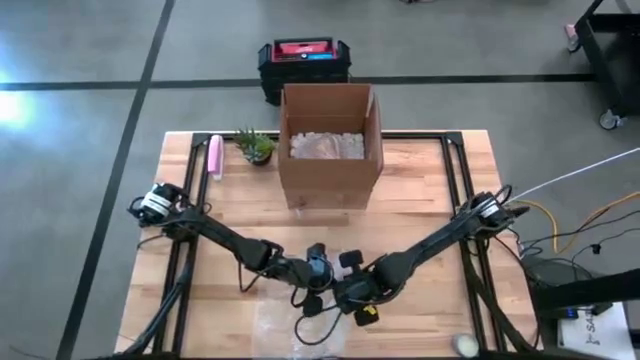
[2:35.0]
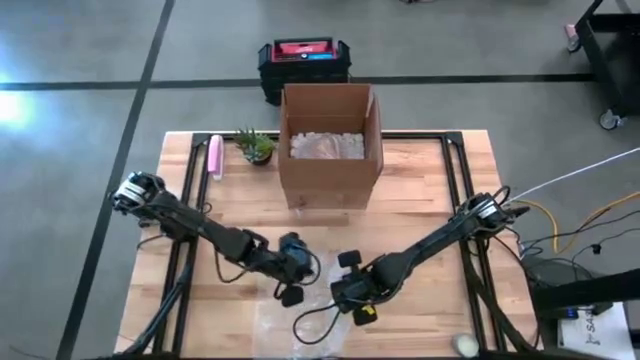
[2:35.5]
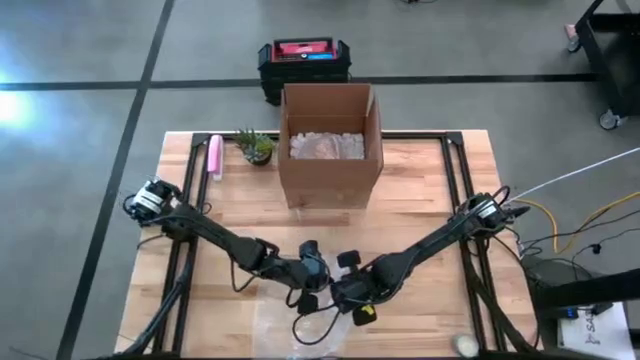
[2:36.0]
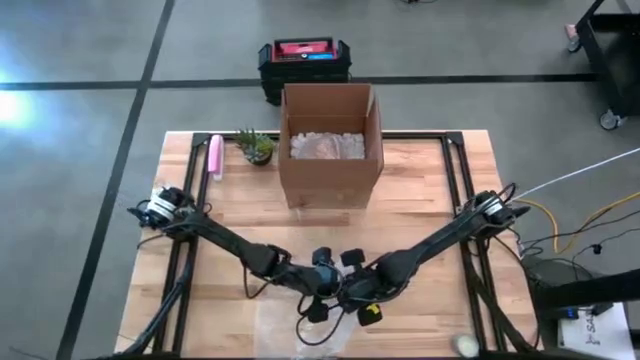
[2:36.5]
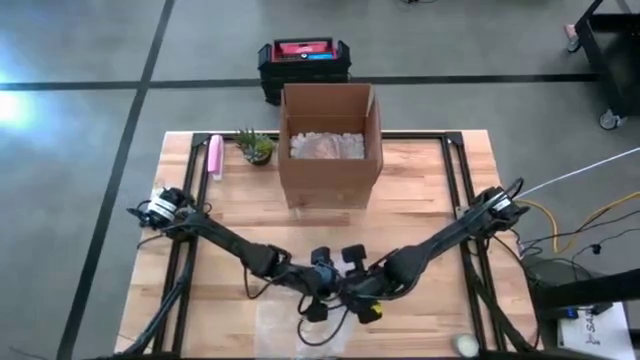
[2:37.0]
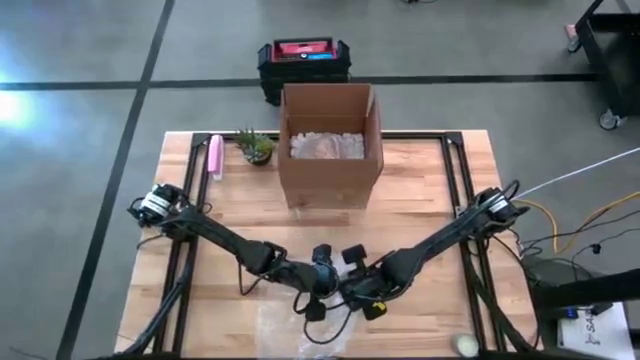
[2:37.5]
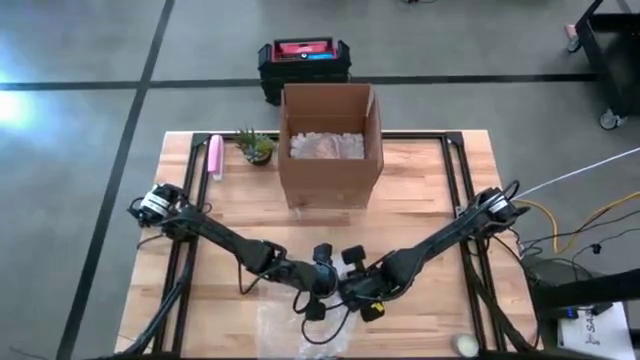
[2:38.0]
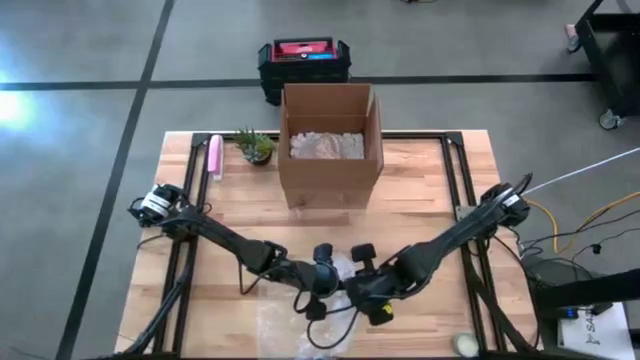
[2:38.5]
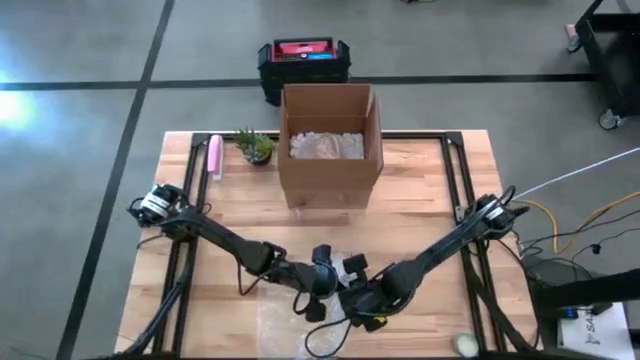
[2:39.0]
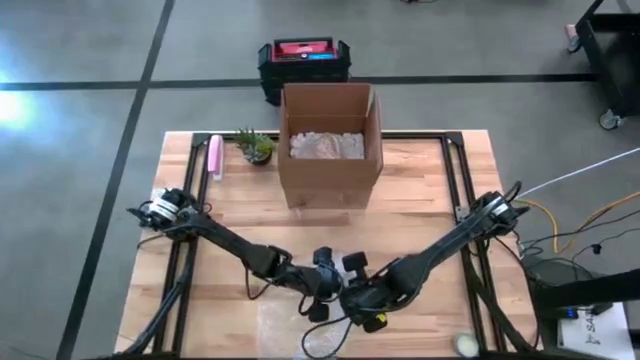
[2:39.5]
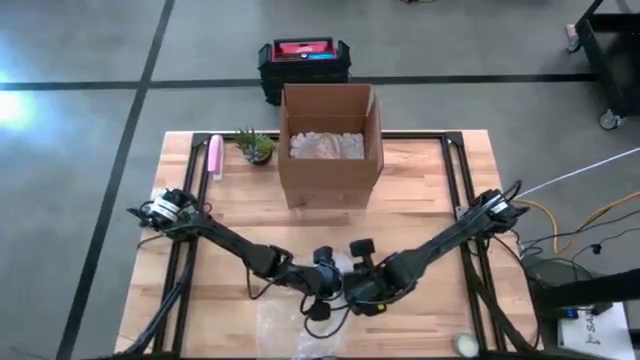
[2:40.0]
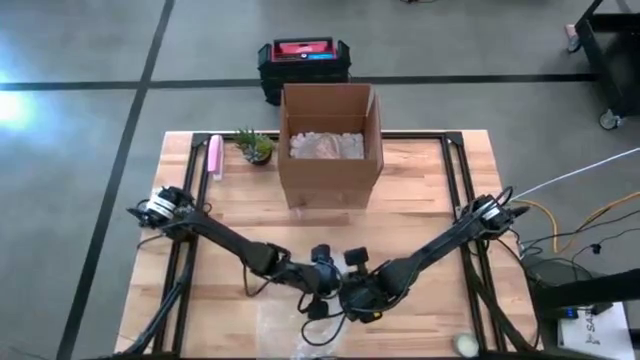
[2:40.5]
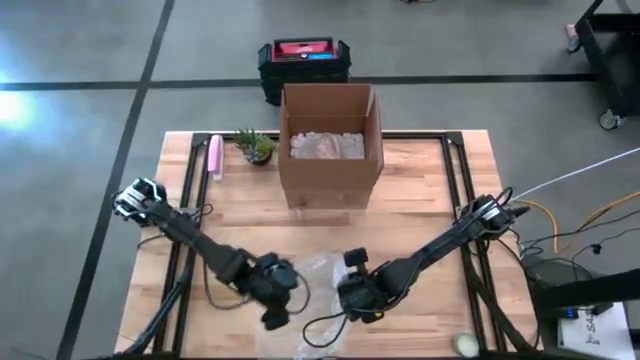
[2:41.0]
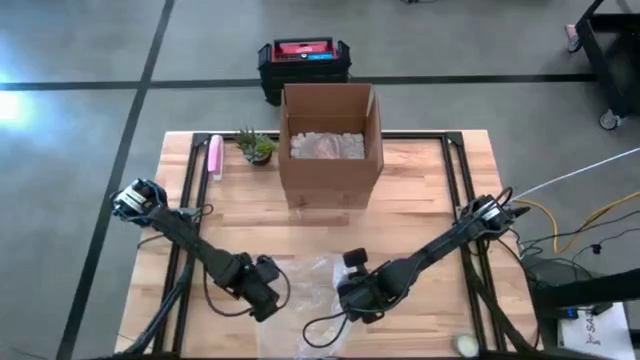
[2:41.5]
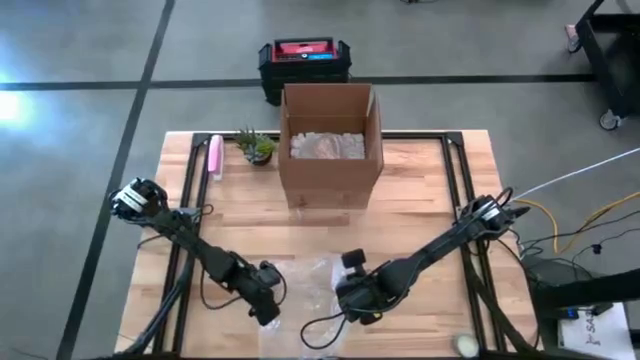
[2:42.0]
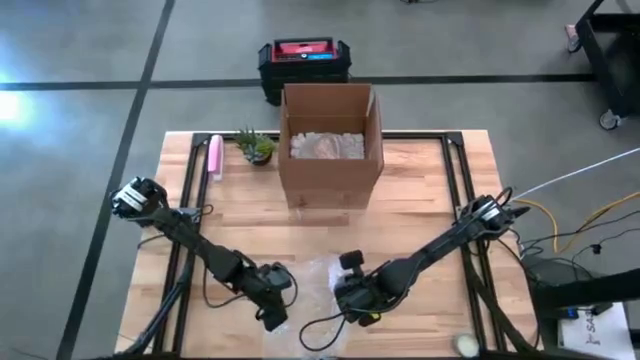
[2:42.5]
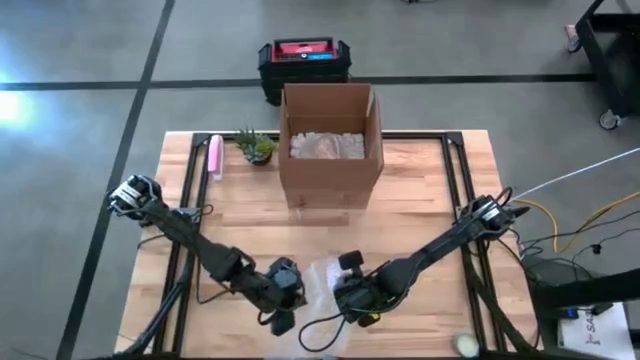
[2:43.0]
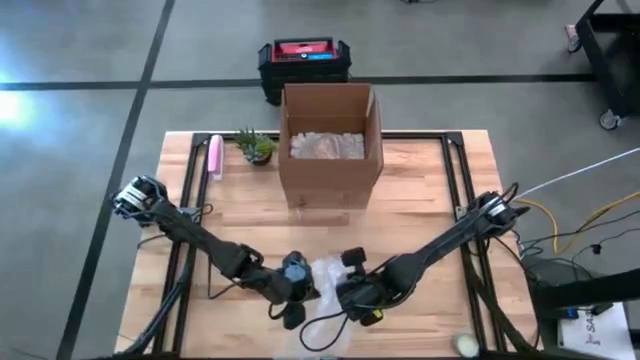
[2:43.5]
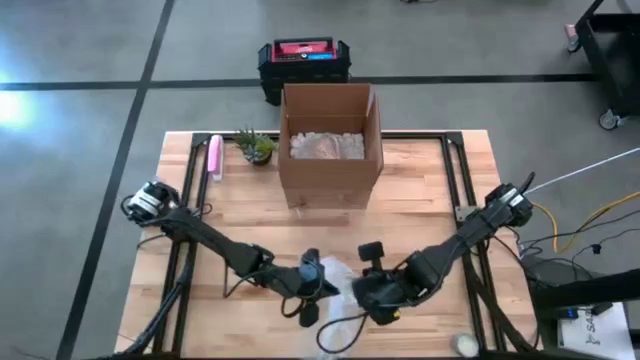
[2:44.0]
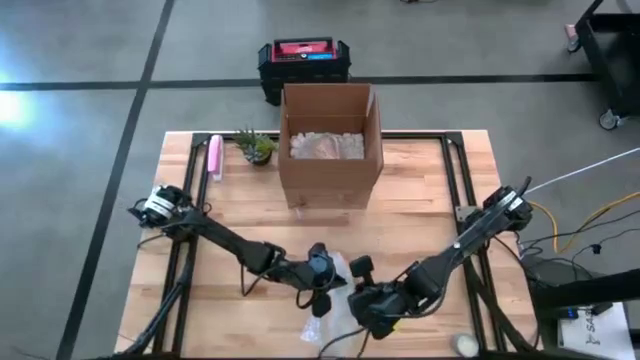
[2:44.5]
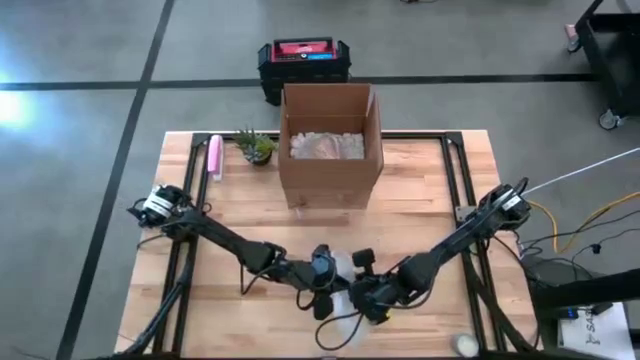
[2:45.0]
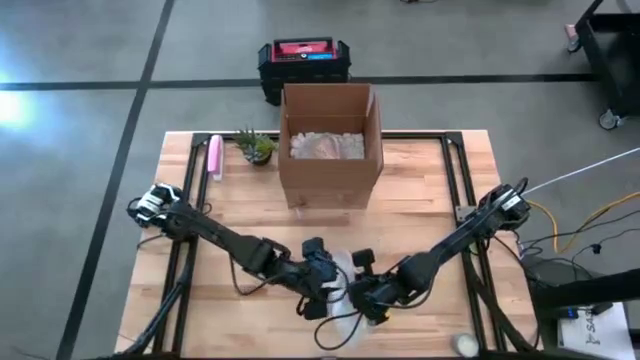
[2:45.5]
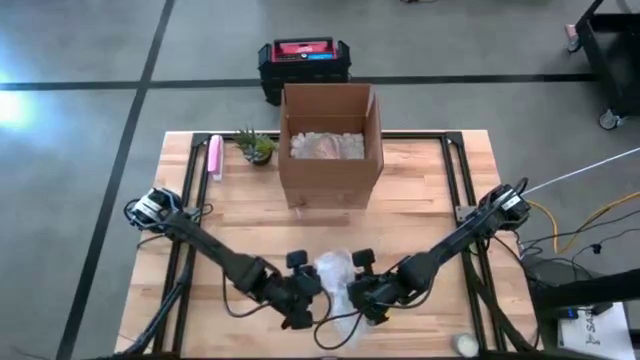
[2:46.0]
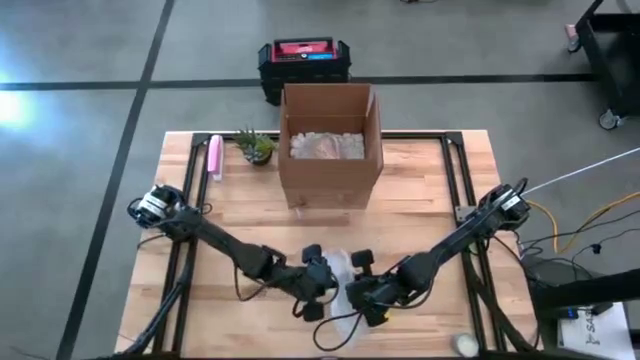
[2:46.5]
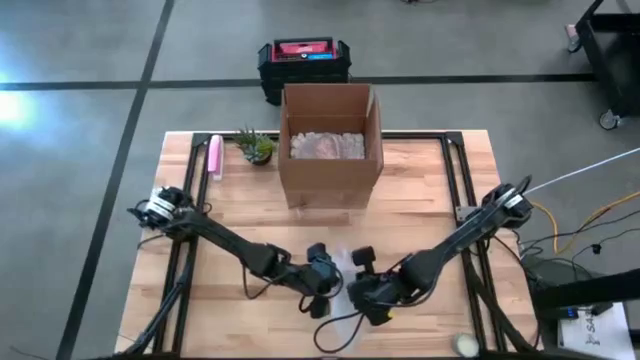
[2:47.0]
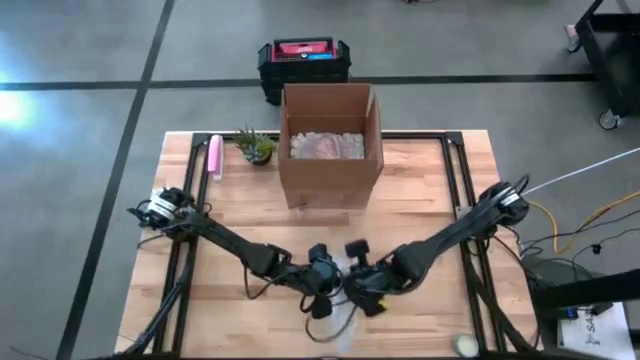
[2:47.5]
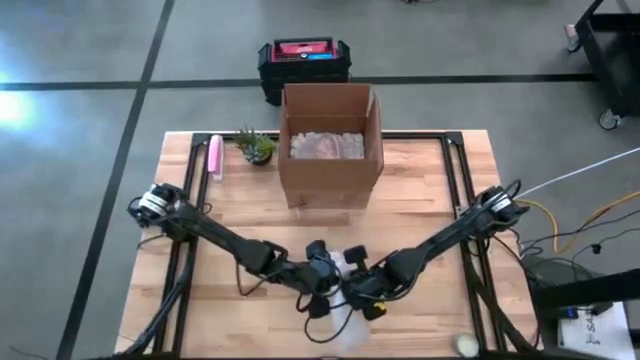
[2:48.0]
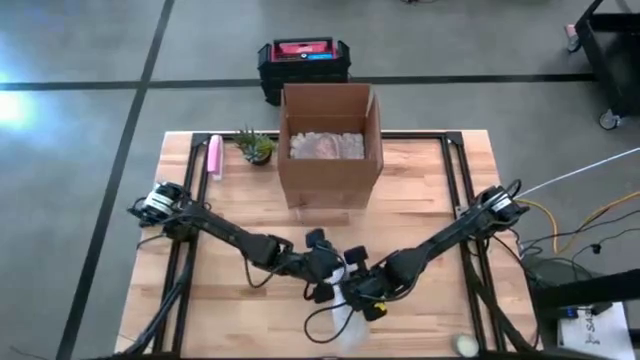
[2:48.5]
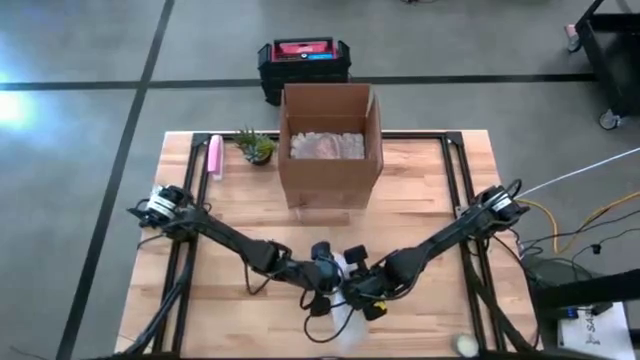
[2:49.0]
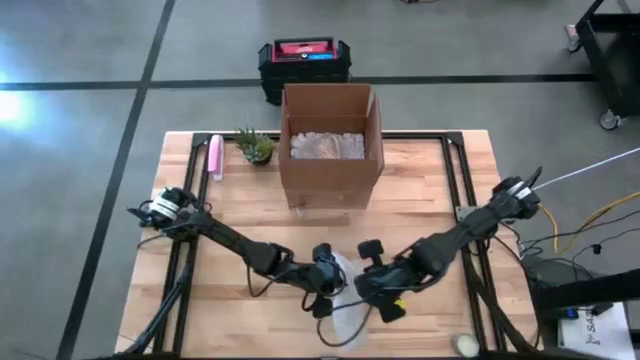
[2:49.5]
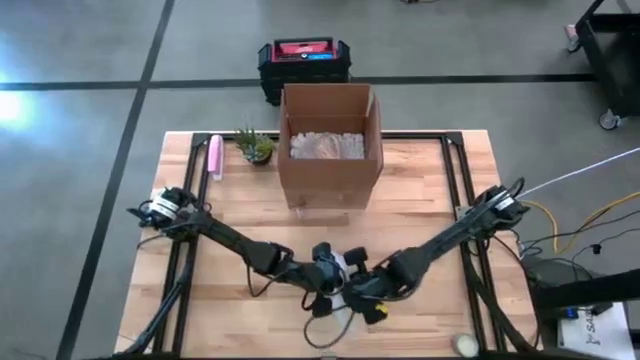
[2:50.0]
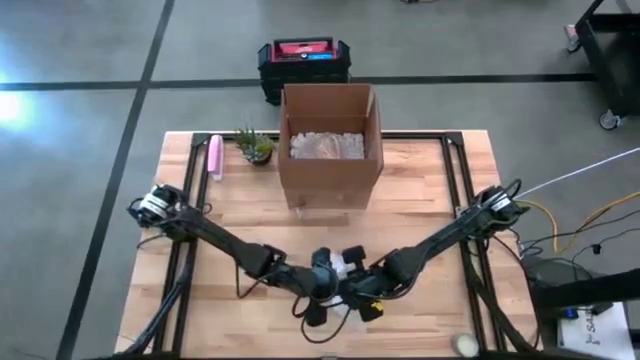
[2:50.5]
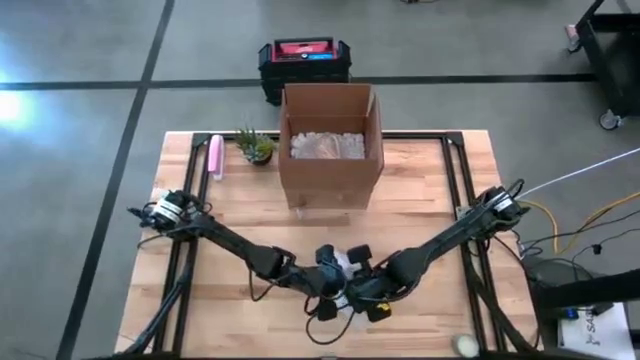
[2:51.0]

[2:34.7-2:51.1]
Task: wrap mug
Wrap the gray mug with the bubble wrap

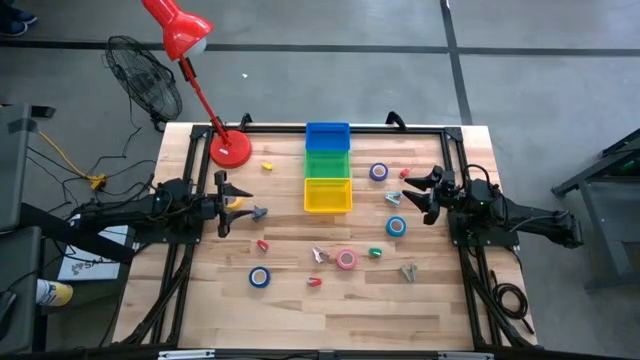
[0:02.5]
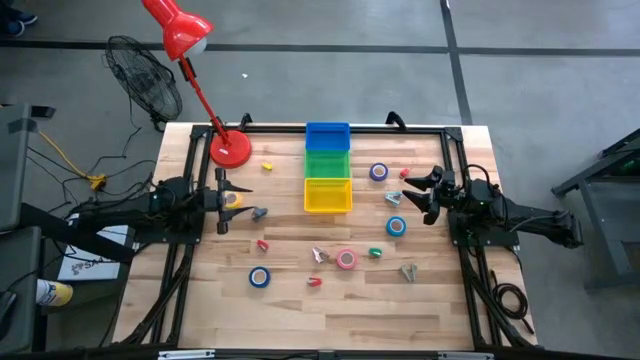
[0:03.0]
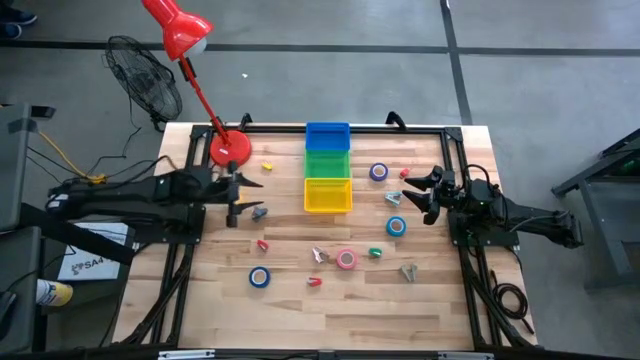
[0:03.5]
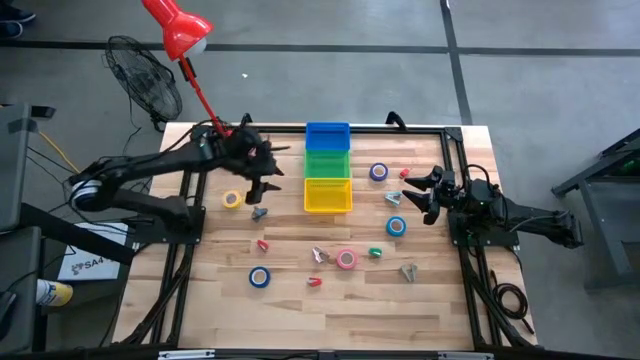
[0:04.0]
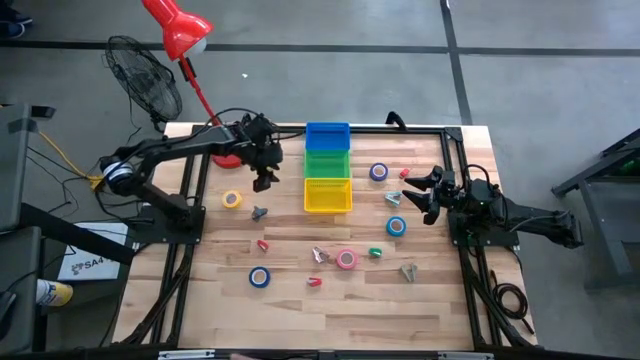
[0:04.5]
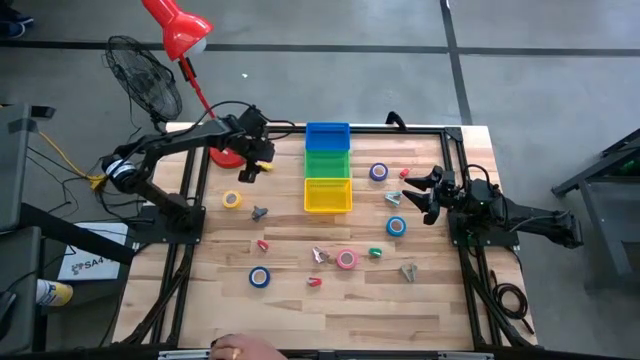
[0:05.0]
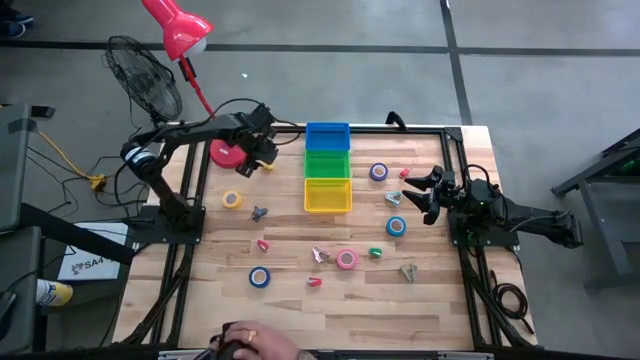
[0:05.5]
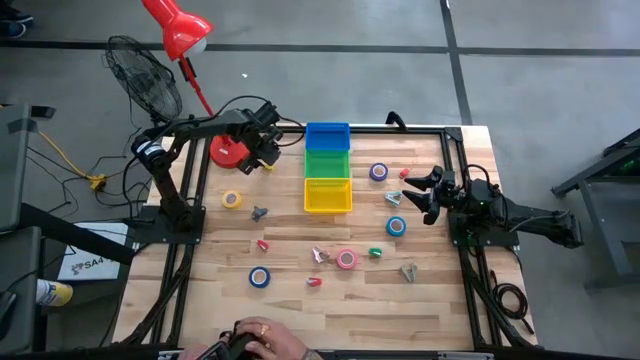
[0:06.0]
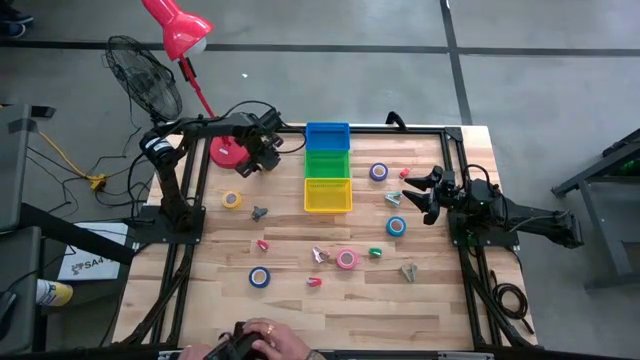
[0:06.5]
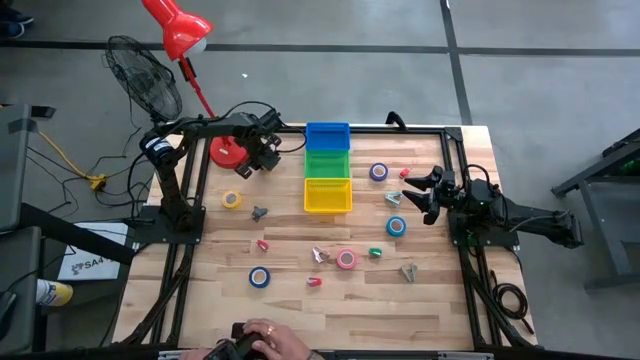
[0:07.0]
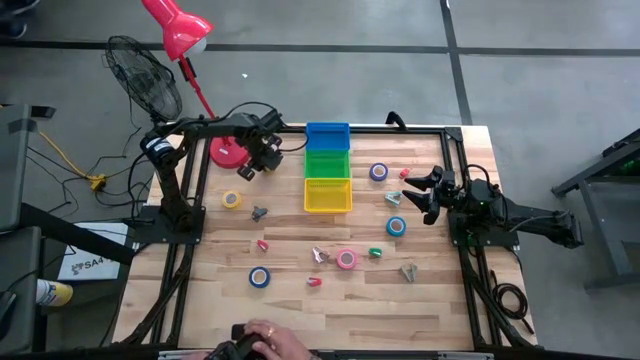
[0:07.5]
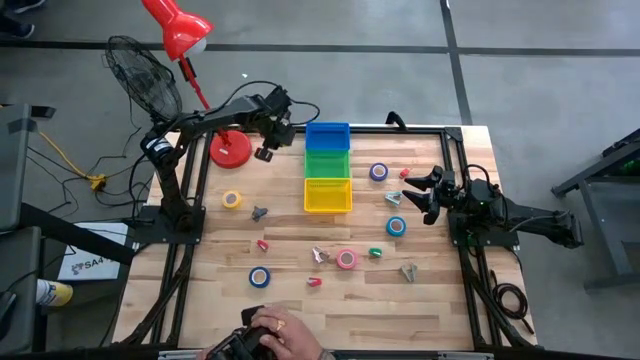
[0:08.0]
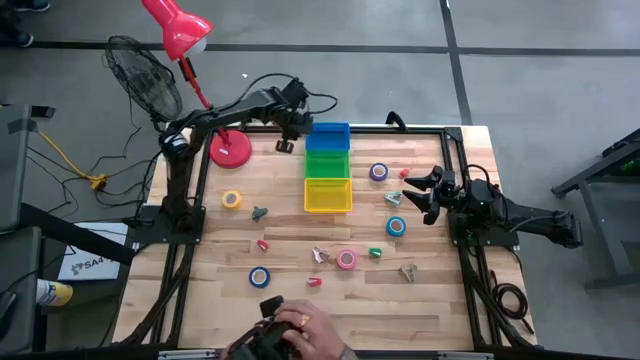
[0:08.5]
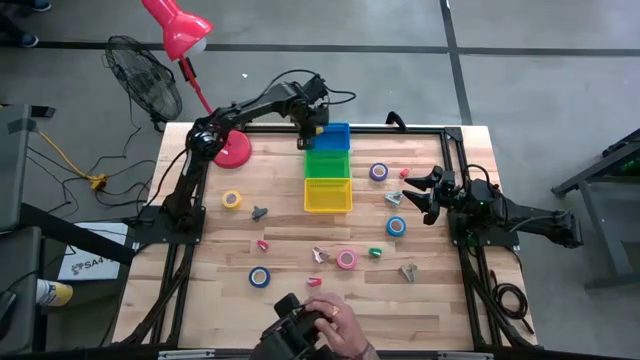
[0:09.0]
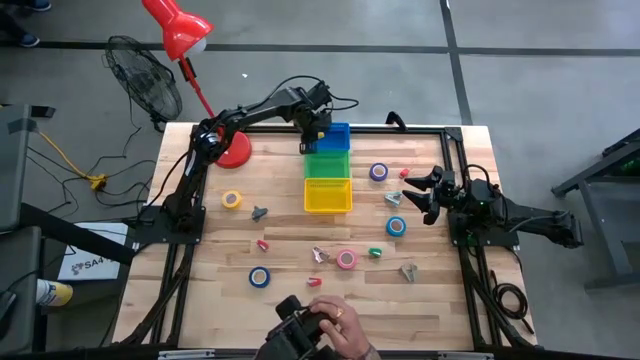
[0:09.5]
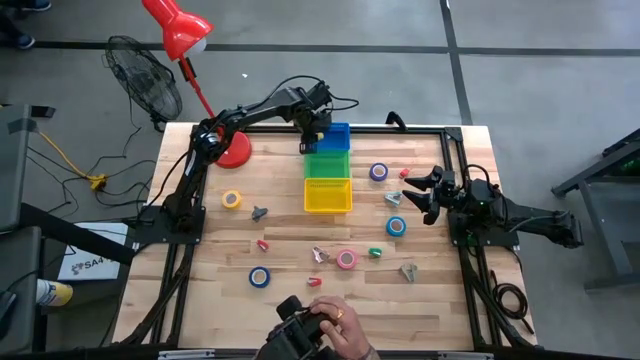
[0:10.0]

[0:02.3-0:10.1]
Task: Pick and place Stapler, Stapler remover, tape
Put the yellow stapler into the blue bin
